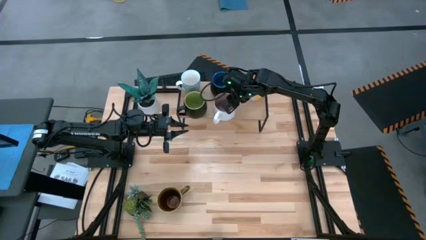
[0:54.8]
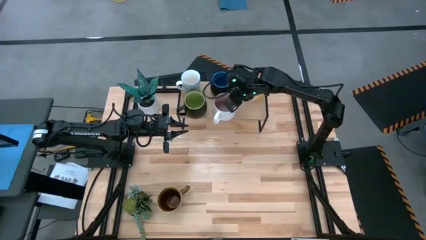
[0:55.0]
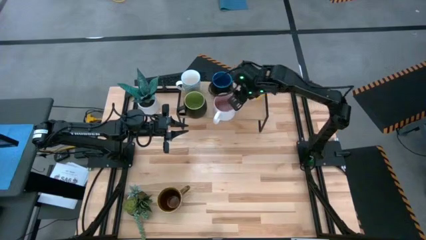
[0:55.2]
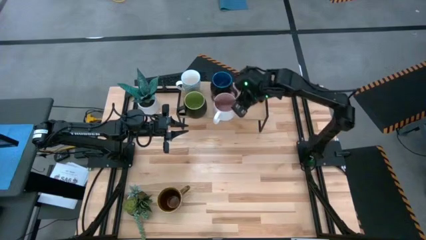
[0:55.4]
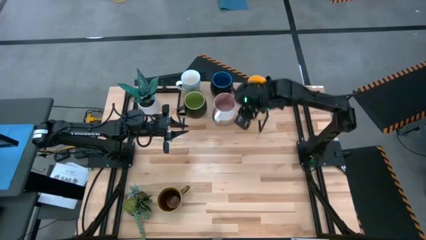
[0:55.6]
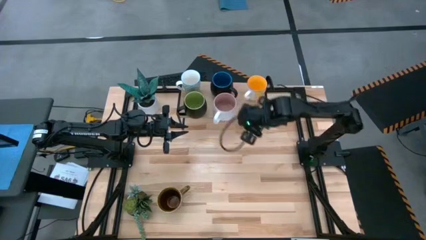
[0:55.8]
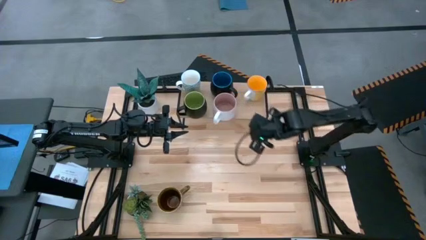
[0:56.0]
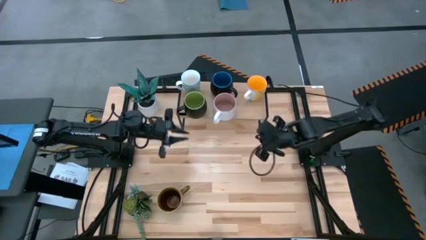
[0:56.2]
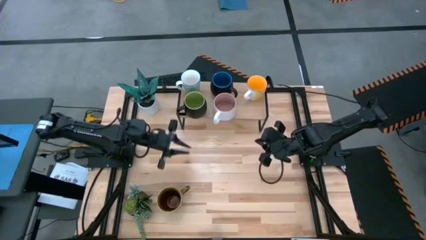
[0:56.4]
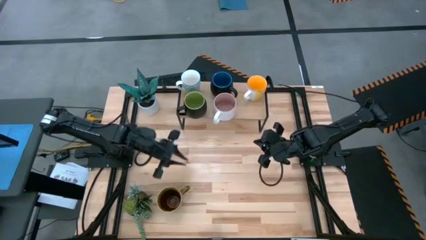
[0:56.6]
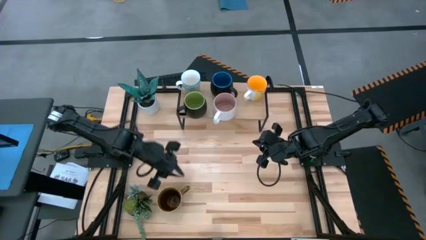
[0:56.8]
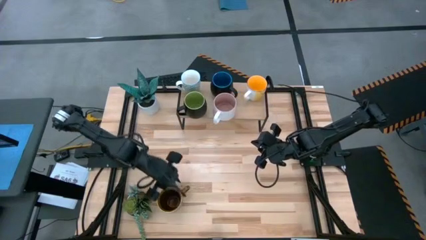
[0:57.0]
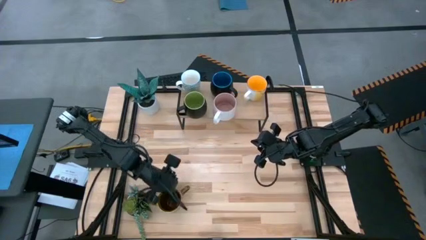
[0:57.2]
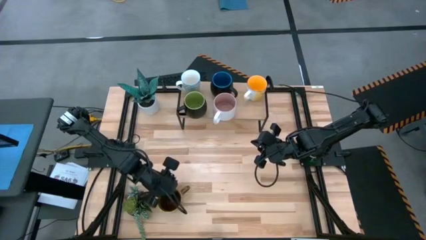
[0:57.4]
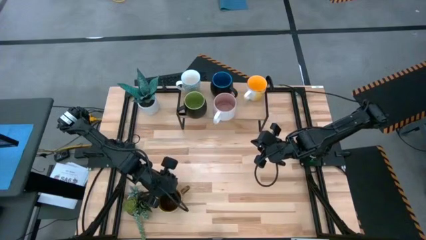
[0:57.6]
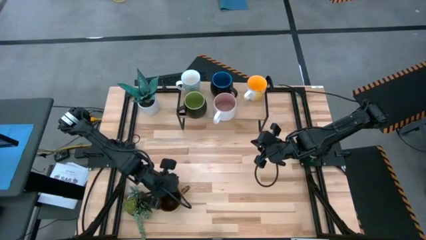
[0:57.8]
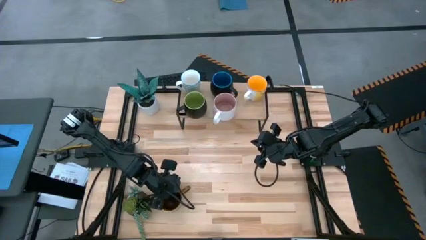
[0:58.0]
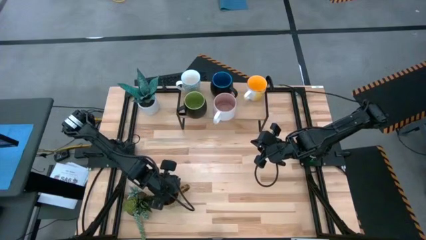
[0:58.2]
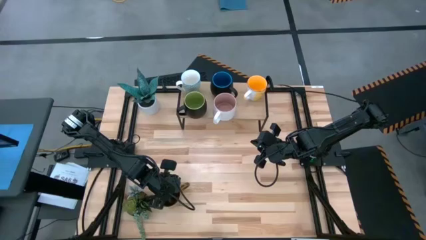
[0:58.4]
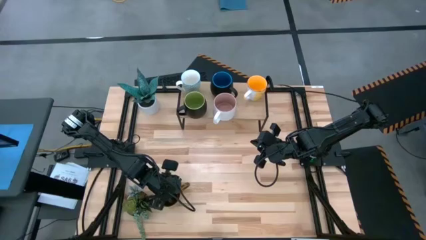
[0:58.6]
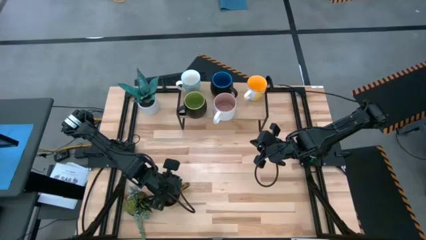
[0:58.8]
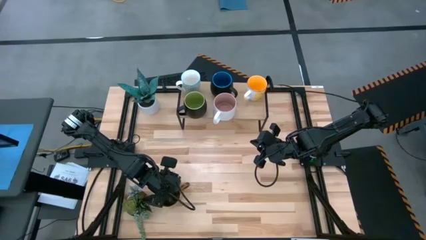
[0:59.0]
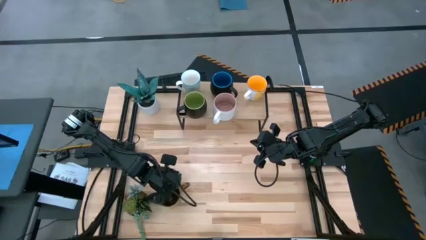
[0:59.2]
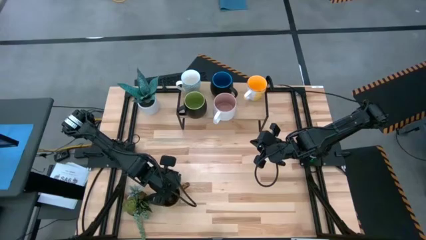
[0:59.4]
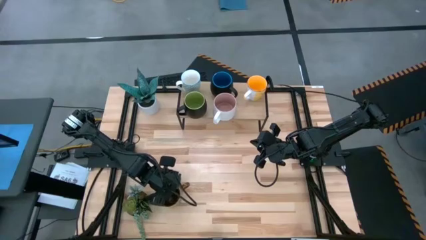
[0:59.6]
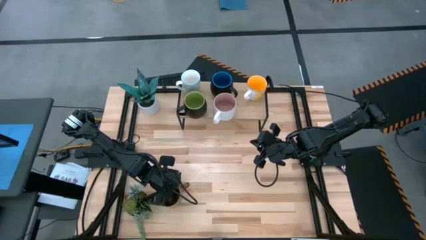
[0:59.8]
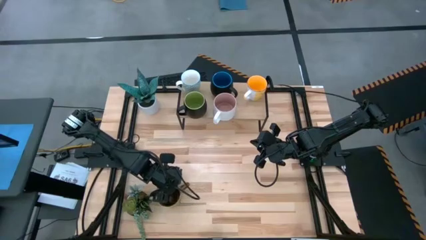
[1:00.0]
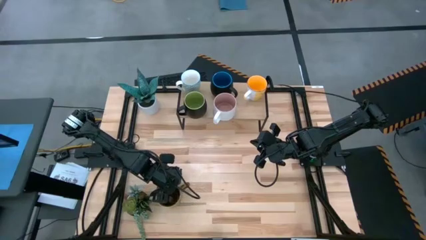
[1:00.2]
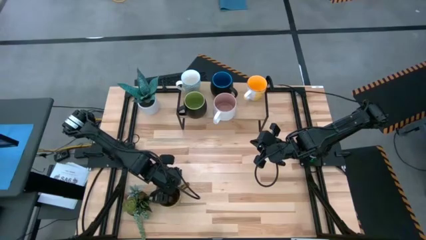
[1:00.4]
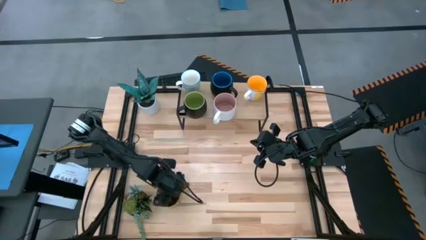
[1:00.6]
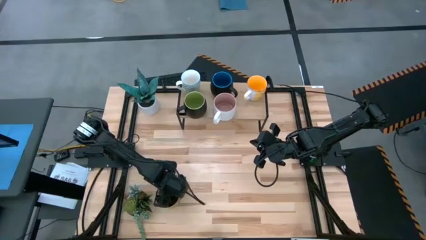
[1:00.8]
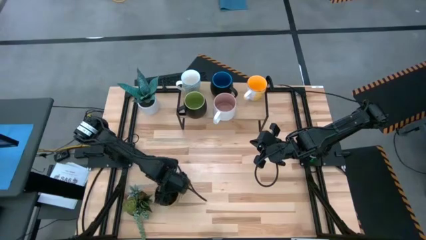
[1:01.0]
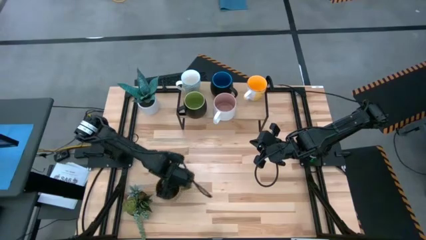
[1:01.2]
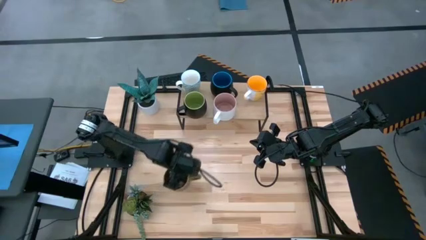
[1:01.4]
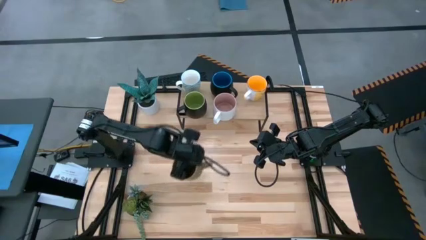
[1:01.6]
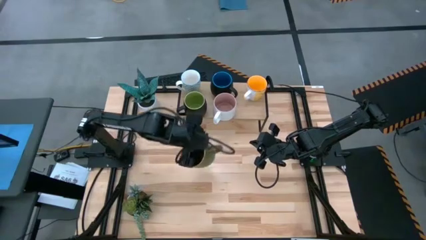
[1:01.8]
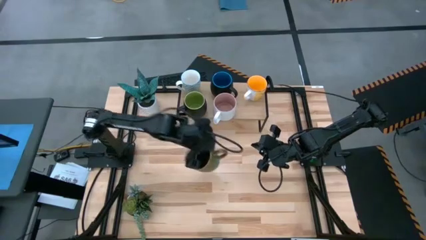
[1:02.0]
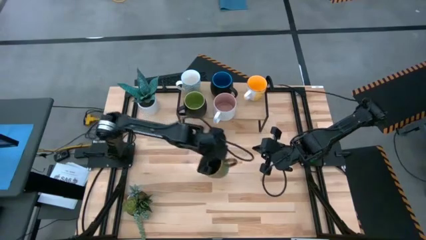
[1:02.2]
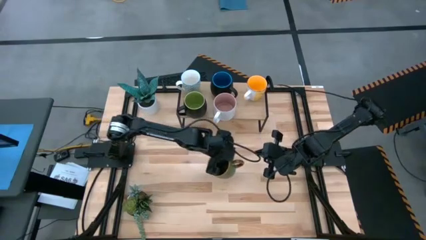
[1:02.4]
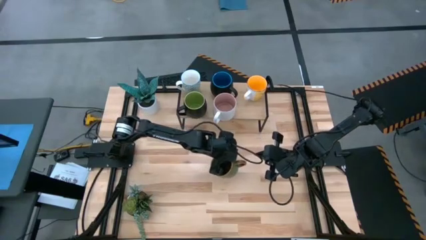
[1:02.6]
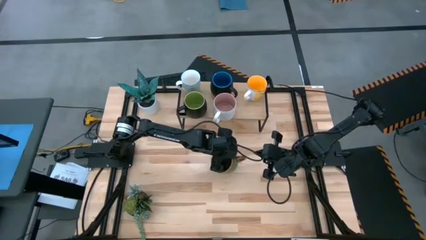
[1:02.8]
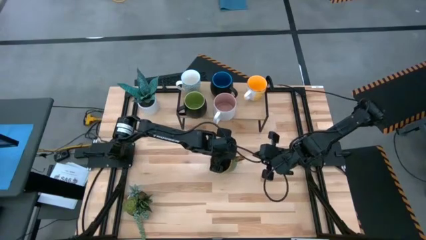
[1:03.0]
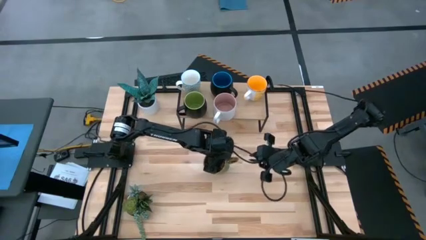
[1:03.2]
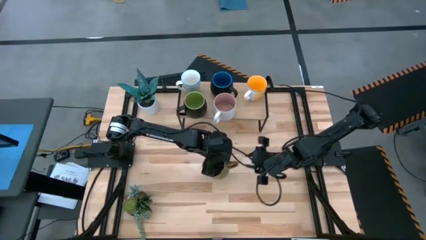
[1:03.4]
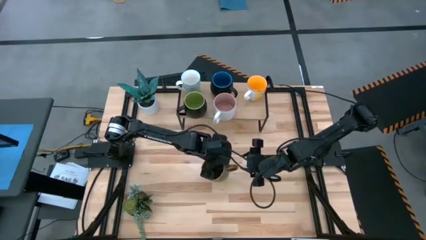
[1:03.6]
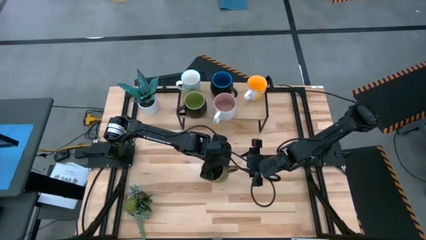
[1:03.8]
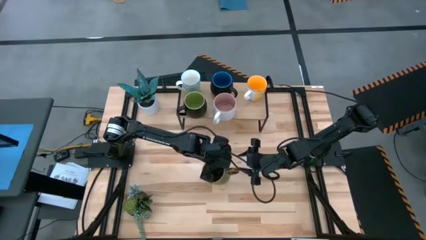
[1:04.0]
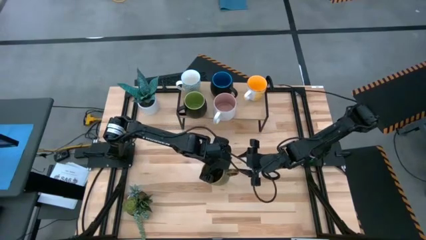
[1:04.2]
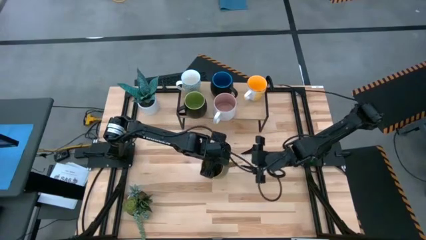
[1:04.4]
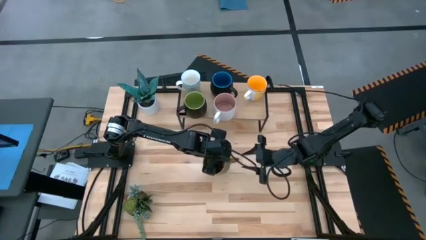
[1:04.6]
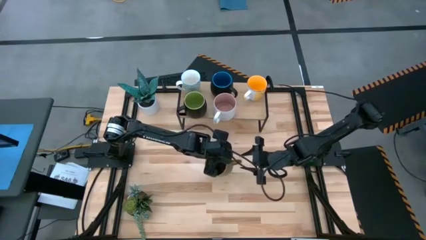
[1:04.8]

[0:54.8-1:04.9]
Task: Place coffee mugs
Put the brown mug on the shelf
